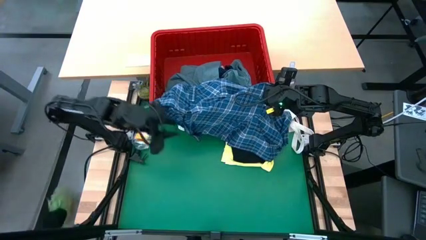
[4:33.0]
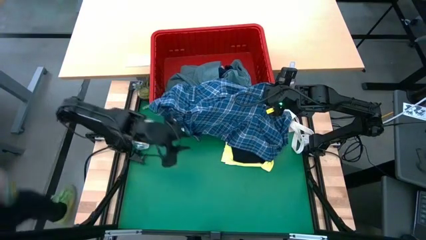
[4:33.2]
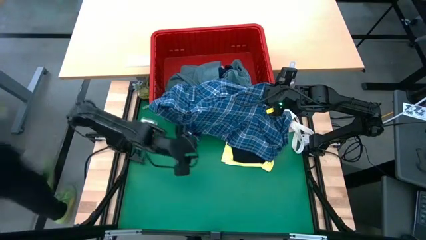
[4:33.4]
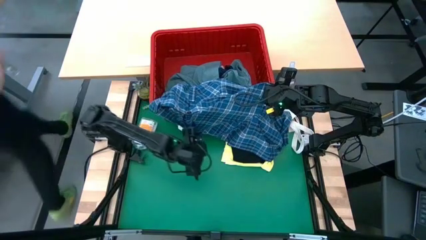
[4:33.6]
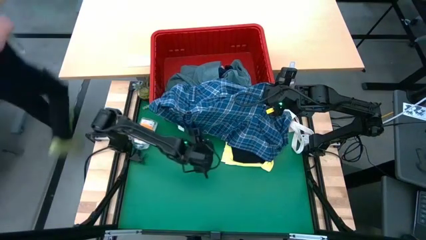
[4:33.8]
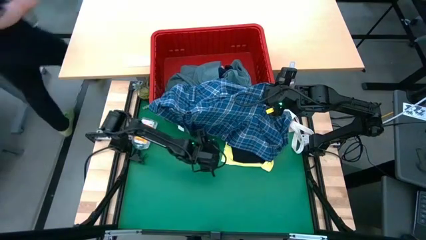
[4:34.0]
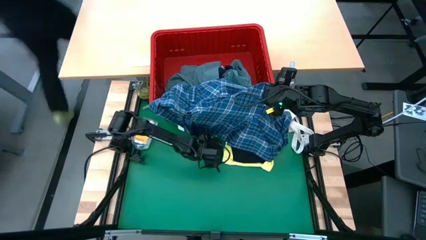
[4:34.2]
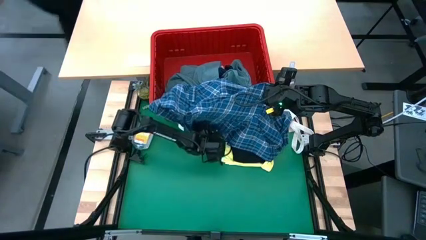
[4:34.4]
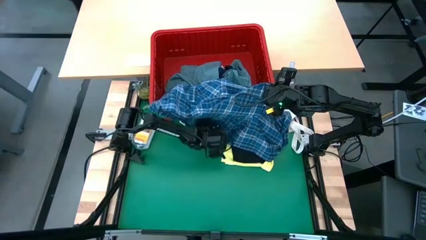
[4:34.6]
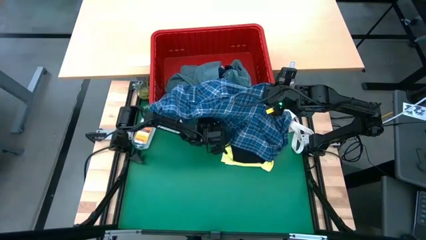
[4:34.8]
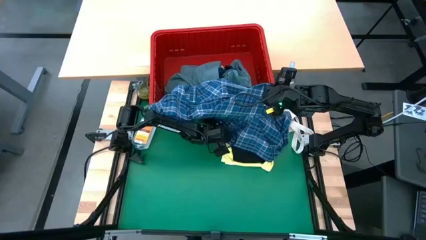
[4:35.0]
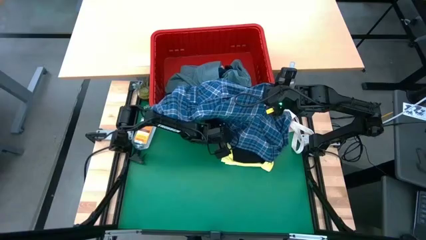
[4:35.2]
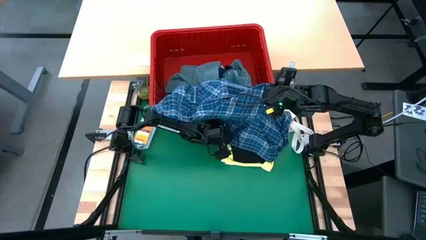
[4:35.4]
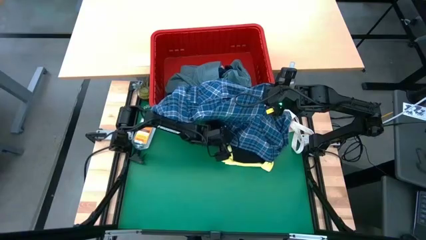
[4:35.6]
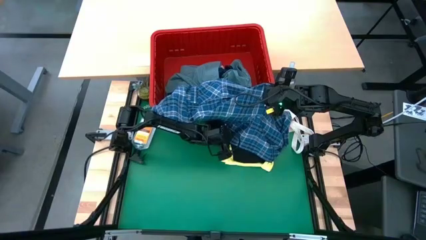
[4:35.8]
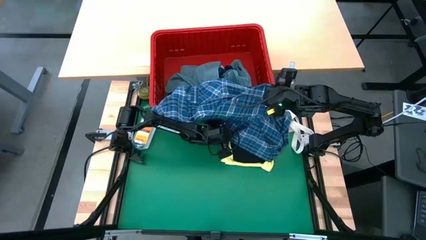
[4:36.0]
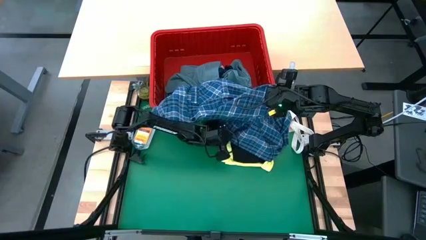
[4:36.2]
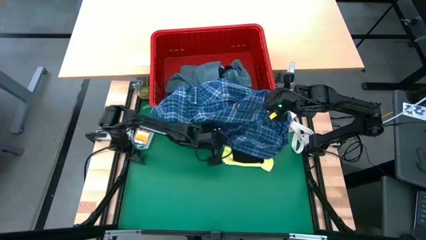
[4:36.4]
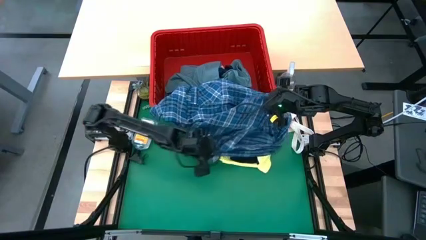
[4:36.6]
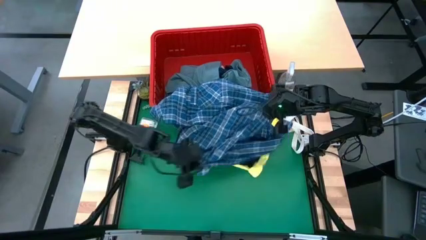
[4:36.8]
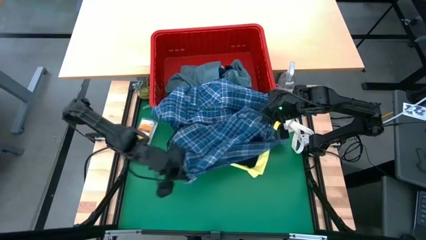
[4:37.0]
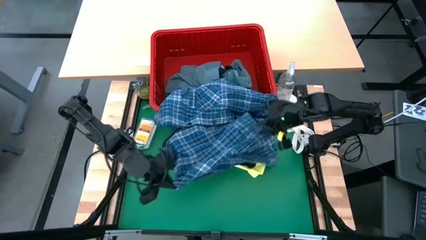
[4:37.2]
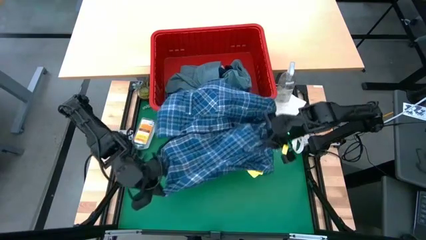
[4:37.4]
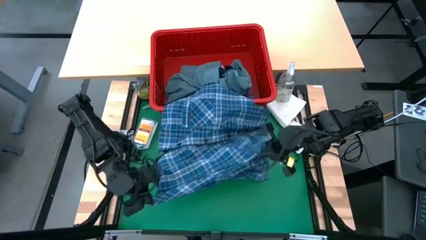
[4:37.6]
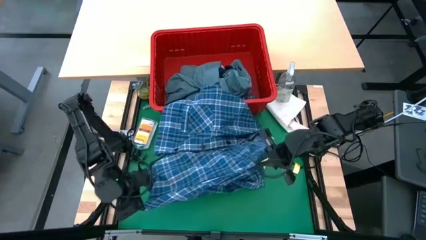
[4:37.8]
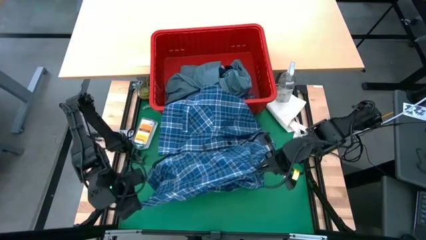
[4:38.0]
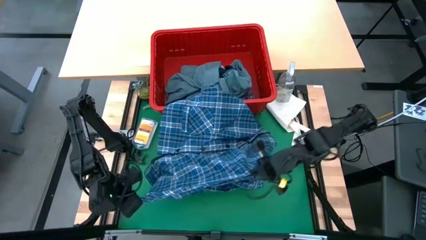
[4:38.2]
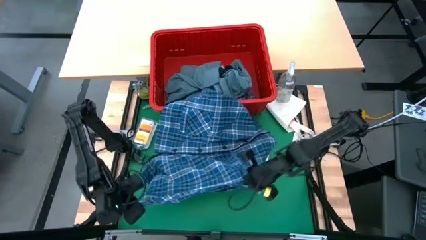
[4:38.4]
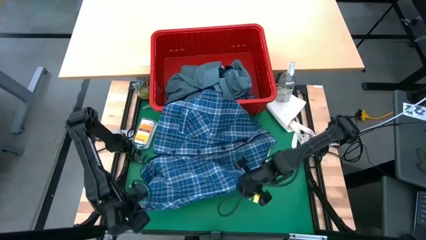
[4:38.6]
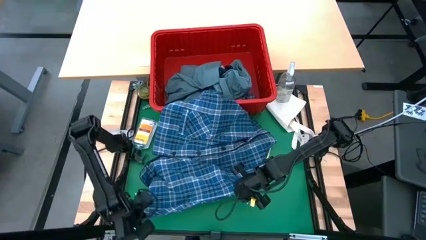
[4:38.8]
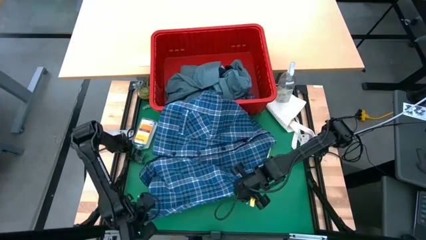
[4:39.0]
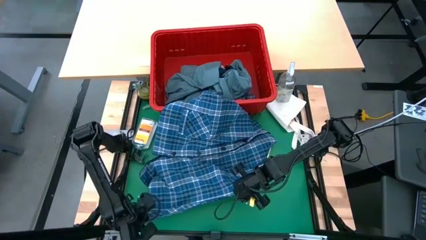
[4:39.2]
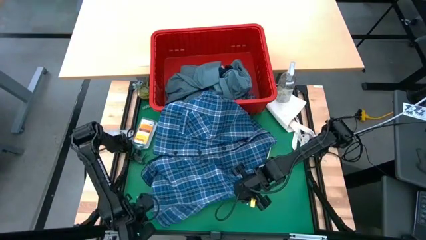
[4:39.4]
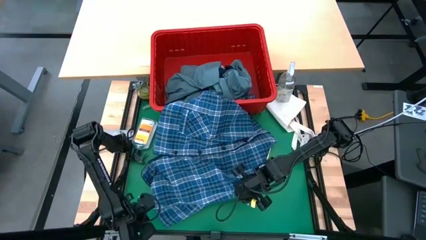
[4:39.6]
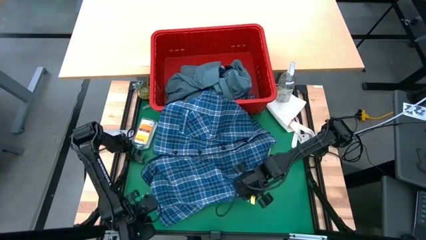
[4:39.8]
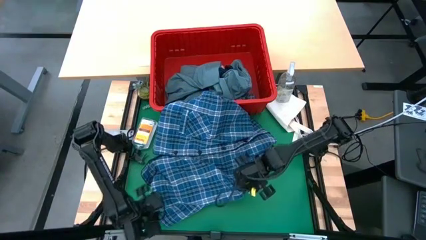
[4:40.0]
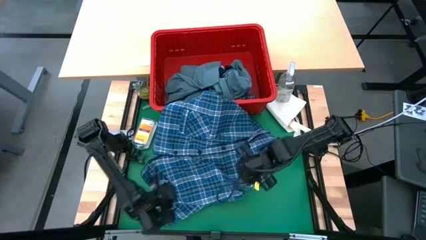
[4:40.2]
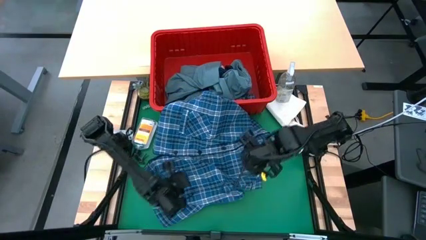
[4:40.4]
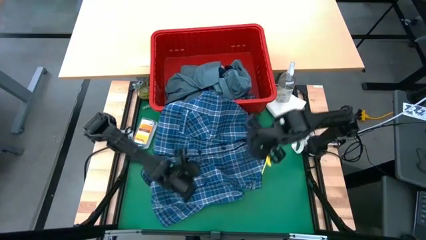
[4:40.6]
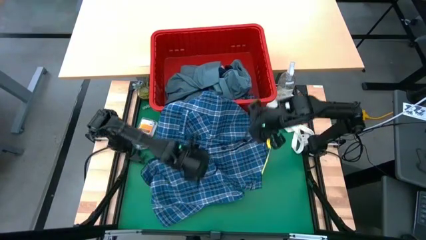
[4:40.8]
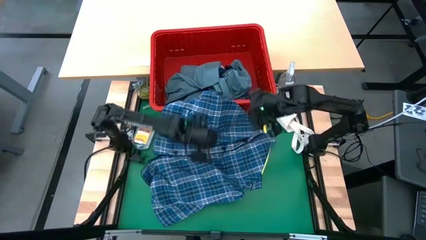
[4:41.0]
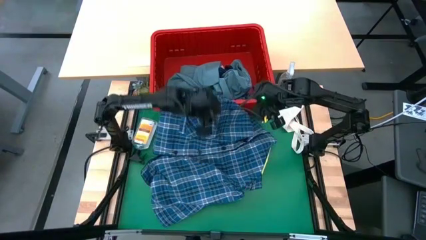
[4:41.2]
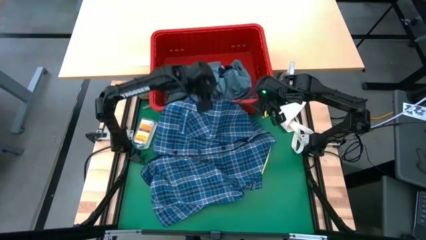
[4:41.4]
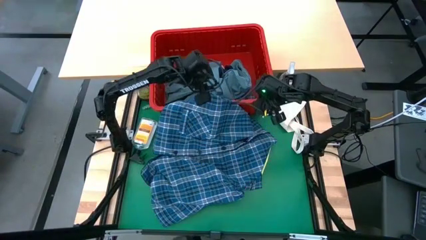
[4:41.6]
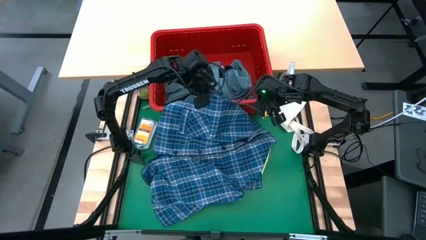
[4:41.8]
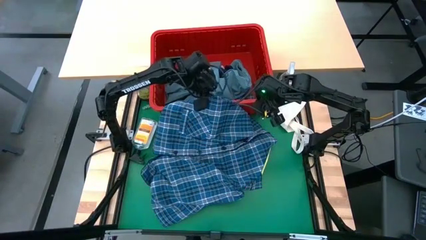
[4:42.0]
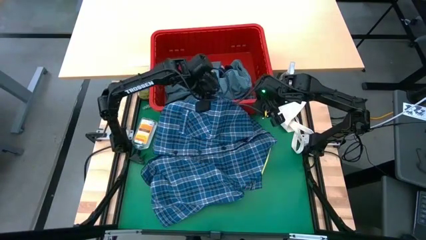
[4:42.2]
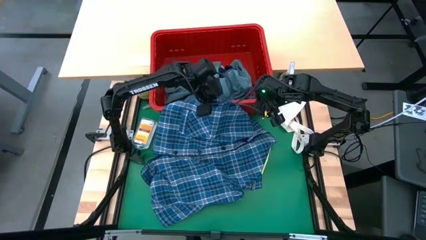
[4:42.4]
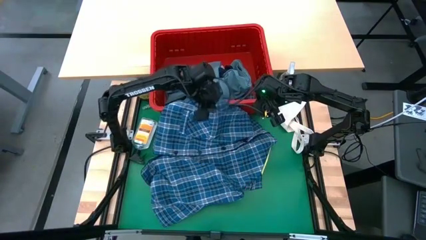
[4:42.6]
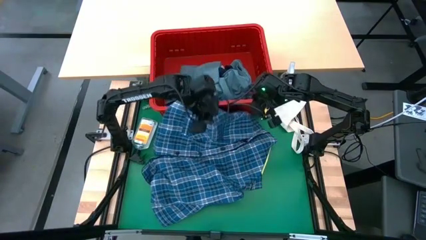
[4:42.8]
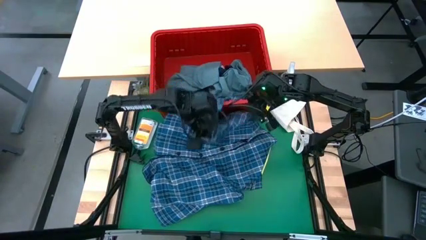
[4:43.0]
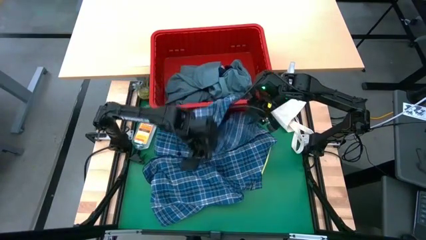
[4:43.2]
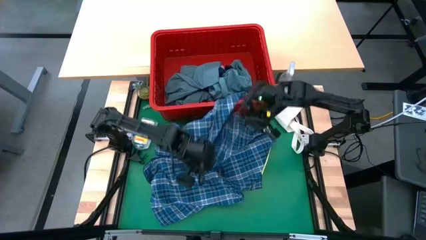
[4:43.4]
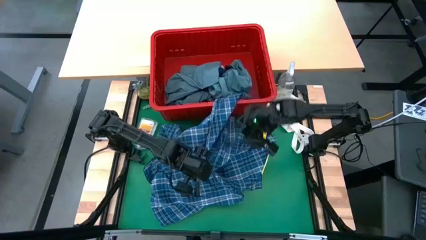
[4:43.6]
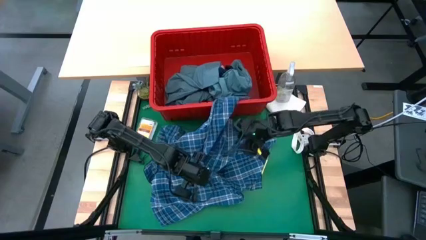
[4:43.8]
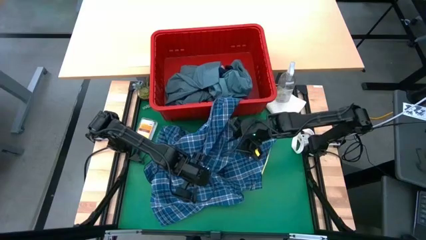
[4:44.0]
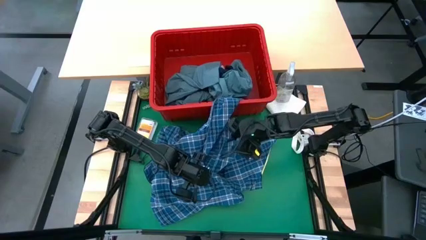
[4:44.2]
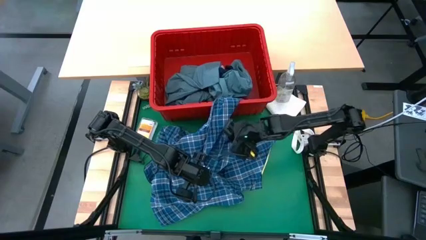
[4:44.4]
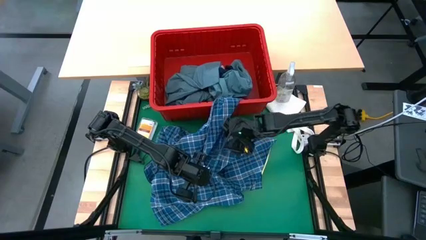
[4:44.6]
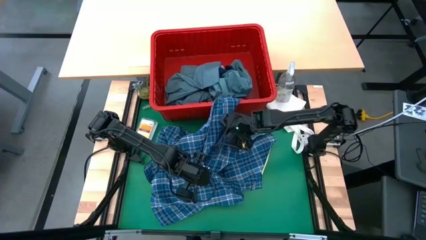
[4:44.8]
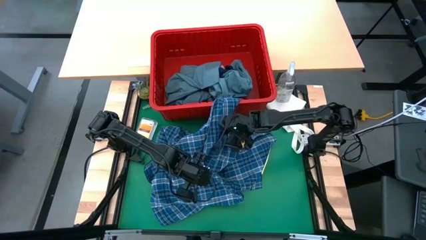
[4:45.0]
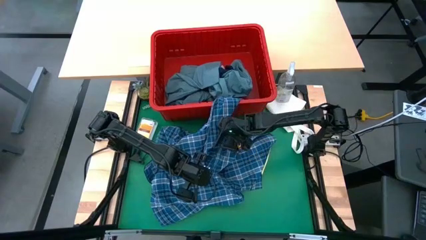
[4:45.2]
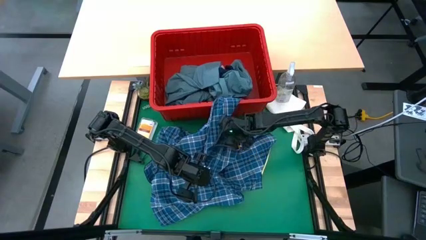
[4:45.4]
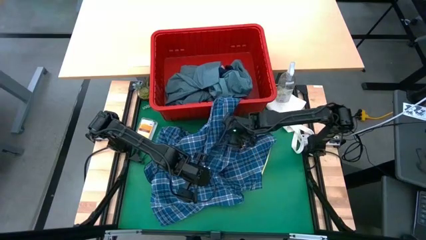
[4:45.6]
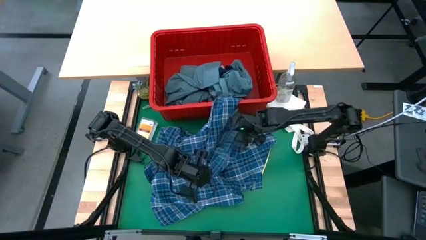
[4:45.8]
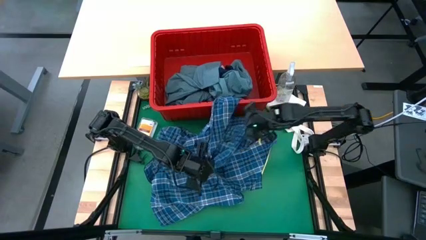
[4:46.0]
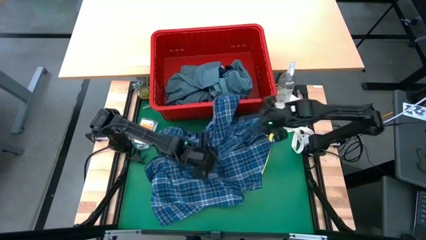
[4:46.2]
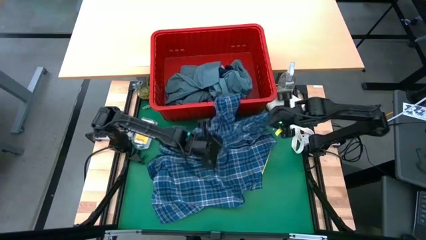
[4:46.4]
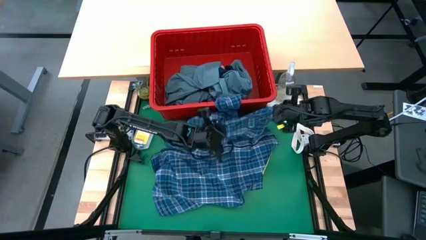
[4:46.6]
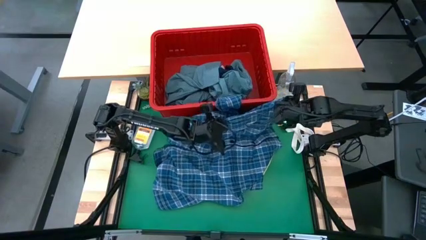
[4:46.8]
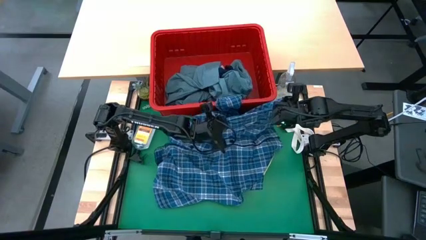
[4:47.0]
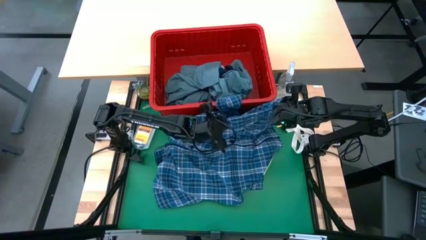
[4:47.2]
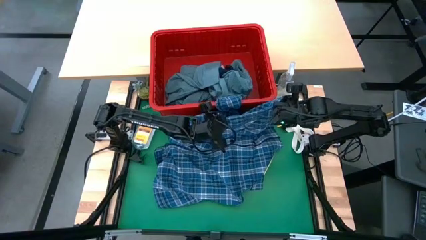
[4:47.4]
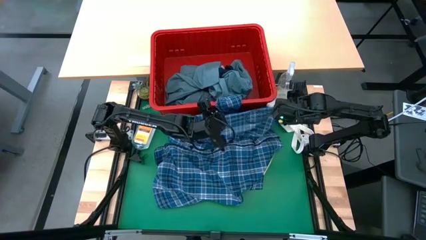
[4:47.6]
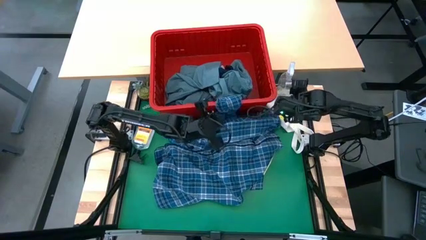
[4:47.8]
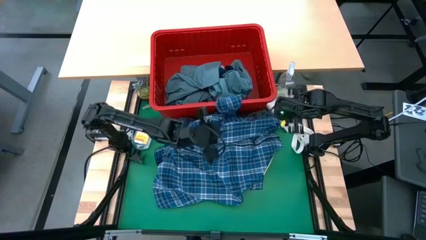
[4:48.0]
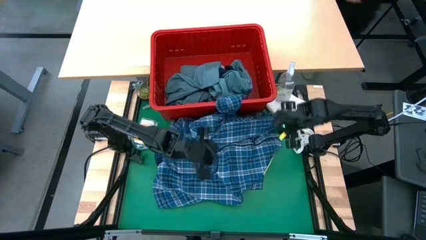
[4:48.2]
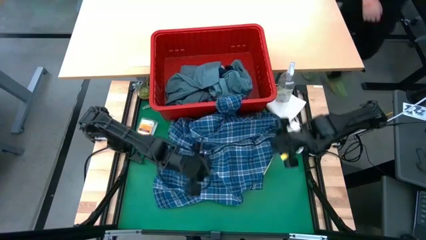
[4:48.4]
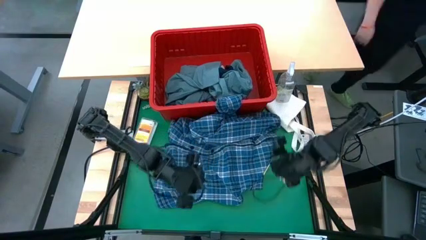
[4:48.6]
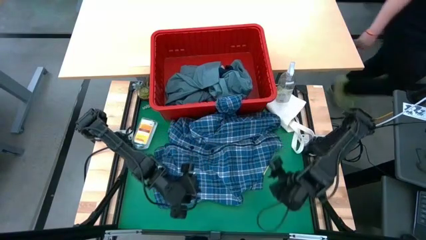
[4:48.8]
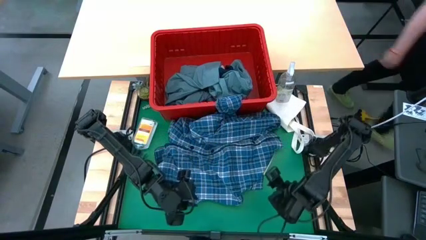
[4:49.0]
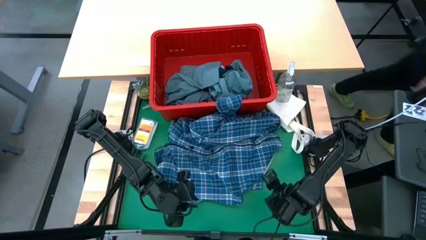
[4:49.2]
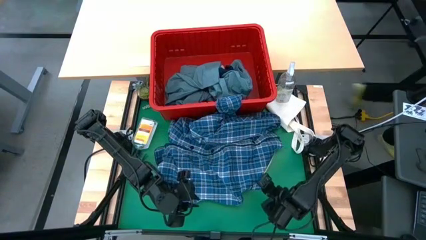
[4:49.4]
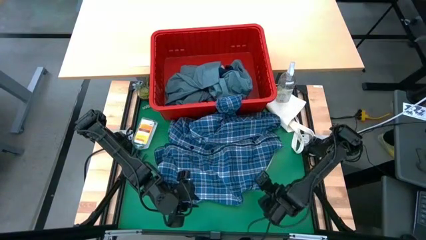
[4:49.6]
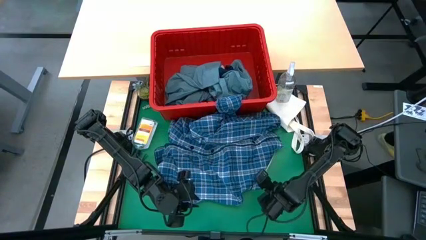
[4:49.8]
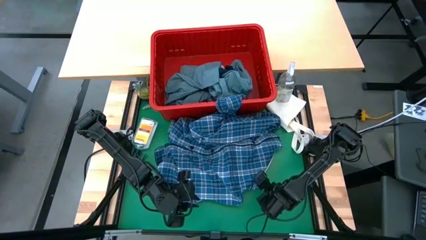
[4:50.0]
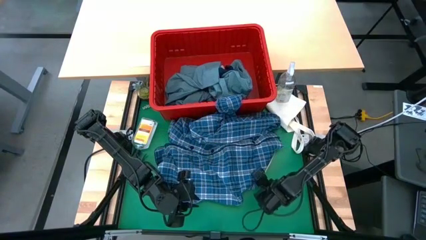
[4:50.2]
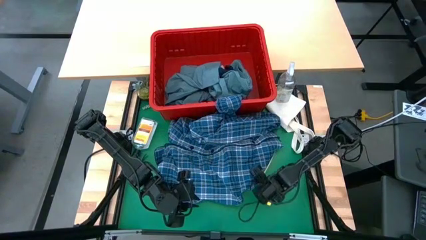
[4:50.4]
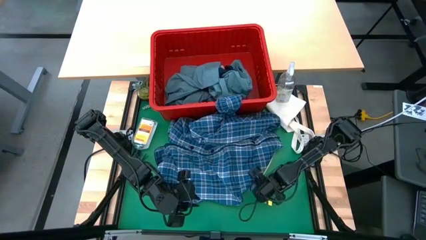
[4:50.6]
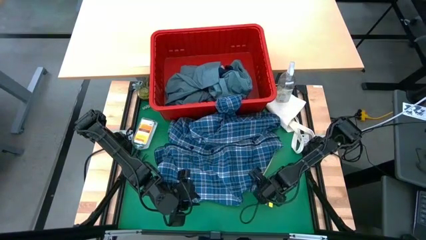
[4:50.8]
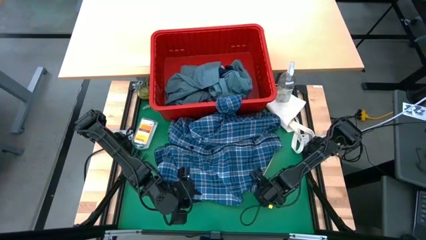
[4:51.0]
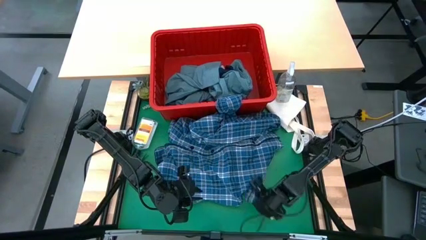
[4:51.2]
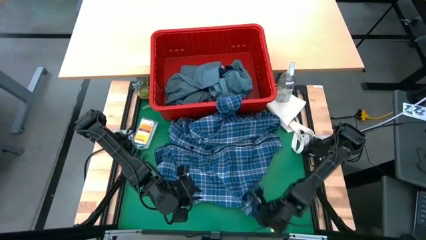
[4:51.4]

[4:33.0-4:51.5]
Task: Fold Laundry from Bin
Fold the blue shirt
